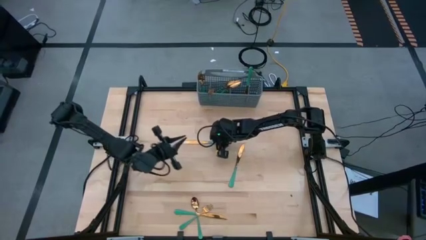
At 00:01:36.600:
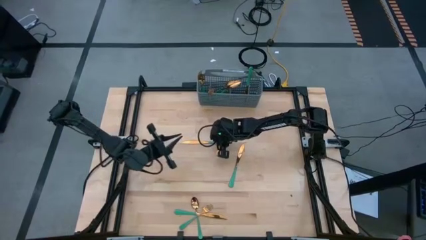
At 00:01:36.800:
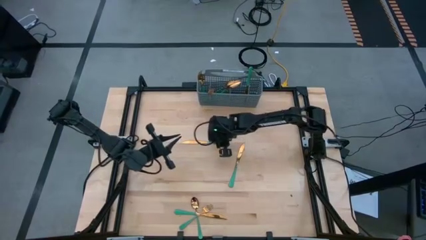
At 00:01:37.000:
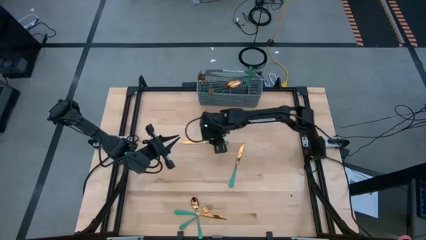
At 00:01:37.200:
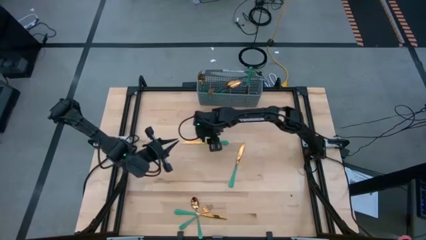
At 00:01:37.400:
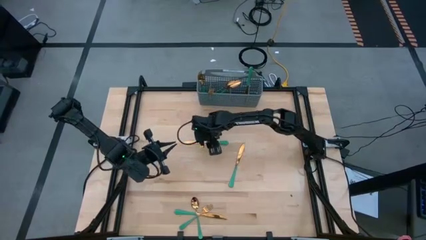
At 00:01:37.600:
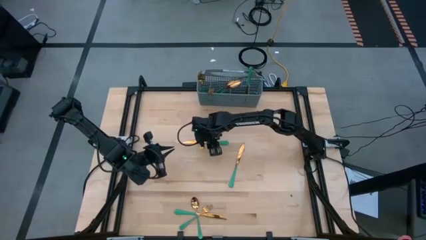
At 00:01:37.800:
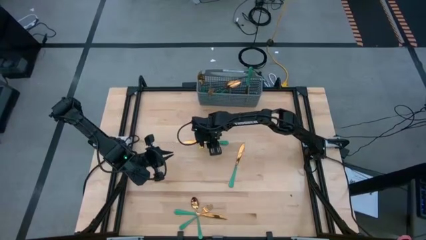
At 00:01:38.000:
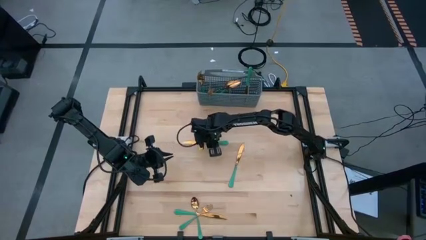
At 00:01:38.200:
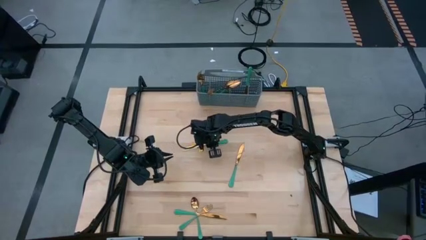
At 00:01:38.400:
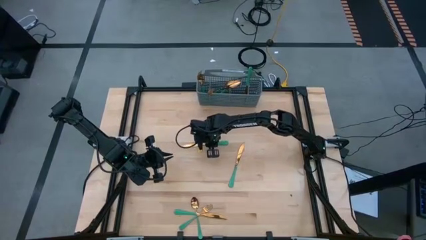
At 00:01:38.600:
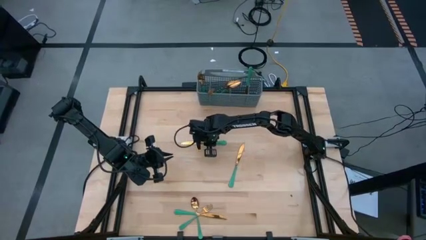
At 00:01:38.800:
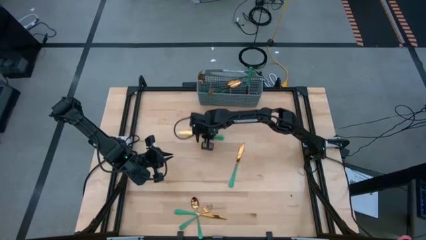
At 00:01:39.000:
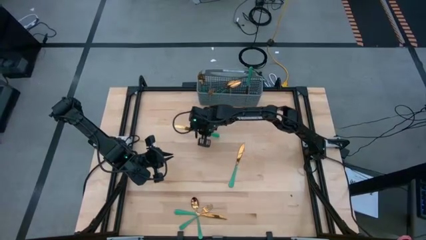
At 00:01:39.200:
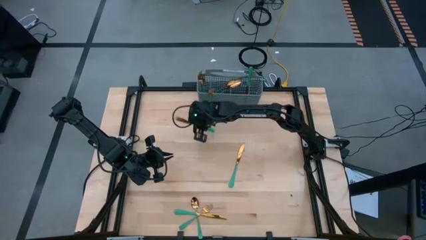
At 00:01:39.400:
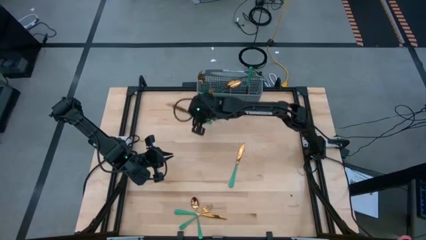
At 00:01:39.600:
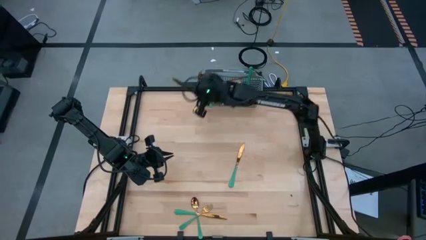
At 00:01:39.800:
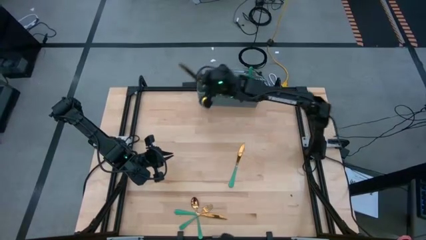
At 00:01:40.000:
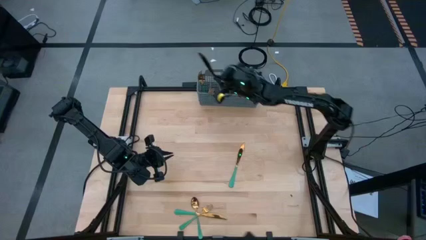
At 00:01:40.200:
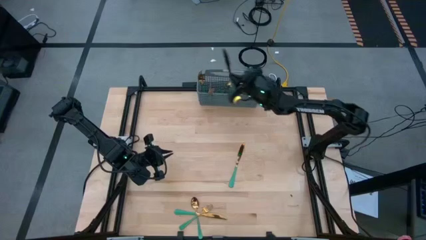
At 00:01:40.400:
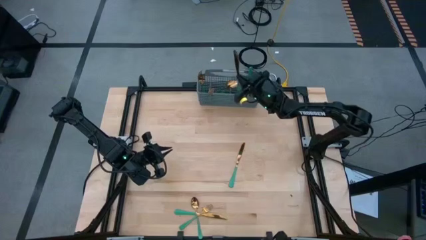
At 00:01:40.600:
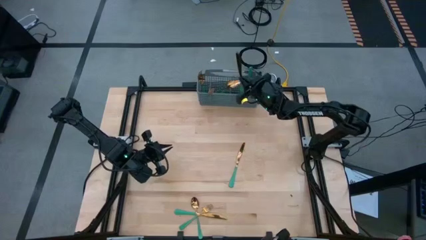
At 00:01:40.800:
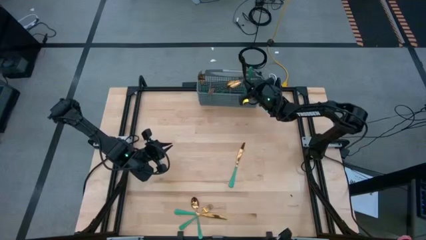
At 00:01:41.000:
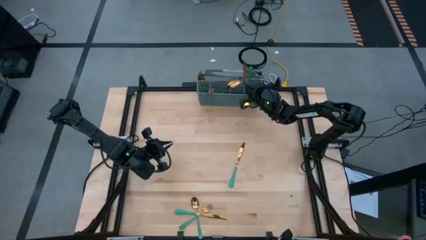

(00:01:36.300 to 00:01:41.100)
Task: Sort silverware
Put the green table knife into the gray silverware basket with the other table knife

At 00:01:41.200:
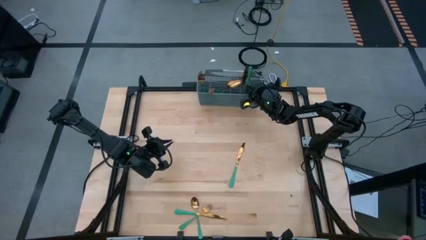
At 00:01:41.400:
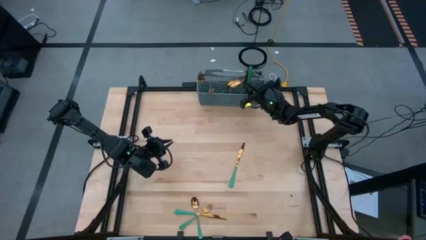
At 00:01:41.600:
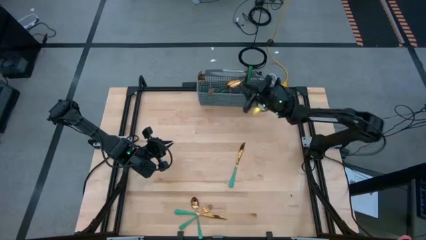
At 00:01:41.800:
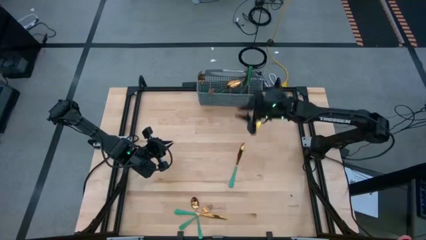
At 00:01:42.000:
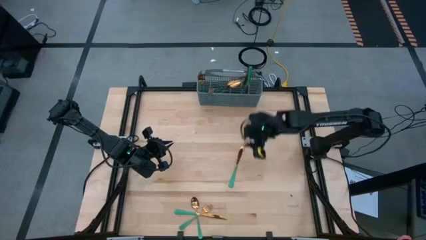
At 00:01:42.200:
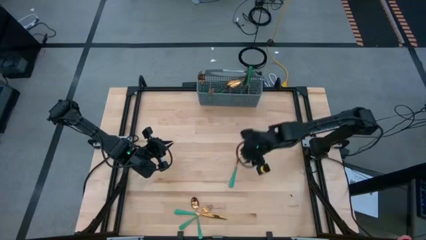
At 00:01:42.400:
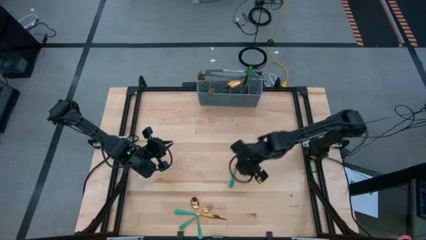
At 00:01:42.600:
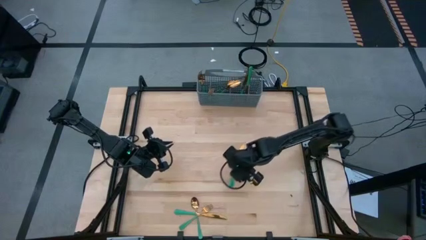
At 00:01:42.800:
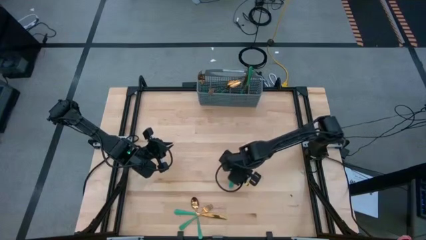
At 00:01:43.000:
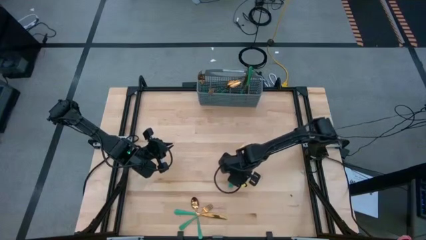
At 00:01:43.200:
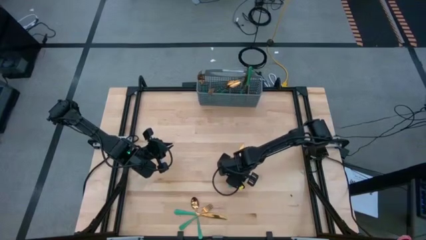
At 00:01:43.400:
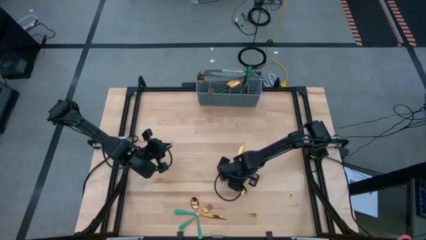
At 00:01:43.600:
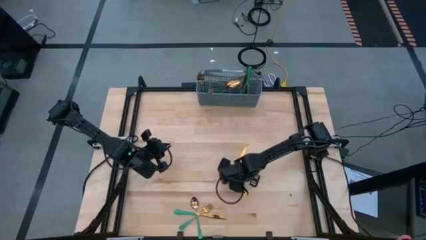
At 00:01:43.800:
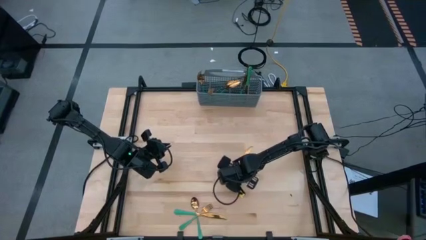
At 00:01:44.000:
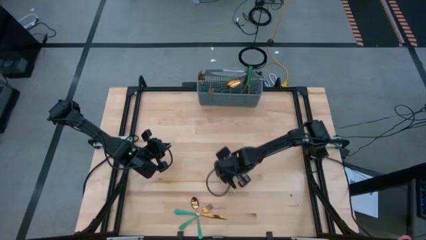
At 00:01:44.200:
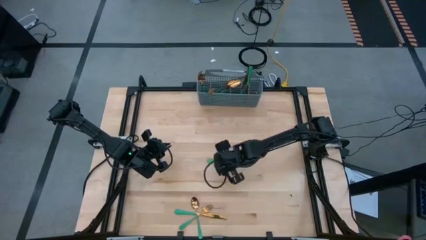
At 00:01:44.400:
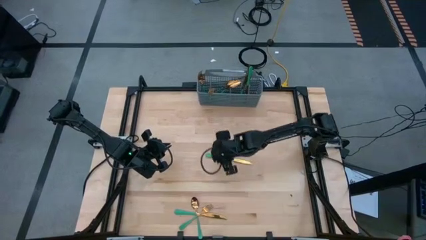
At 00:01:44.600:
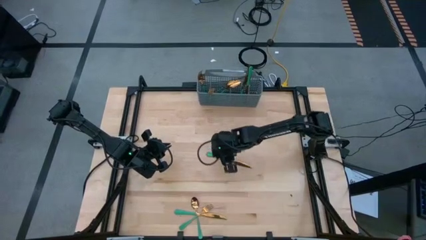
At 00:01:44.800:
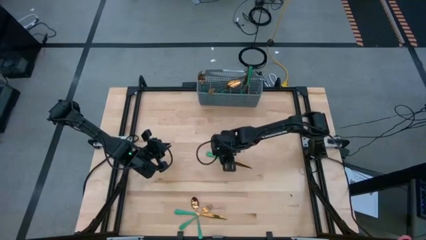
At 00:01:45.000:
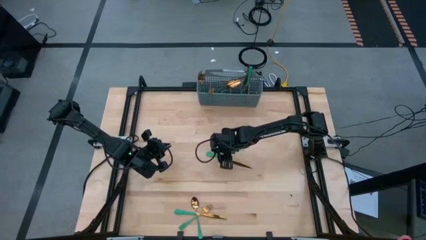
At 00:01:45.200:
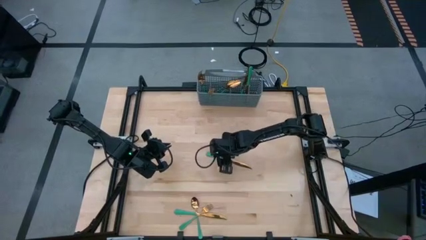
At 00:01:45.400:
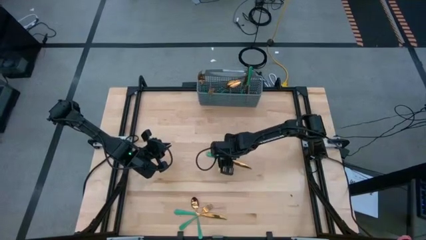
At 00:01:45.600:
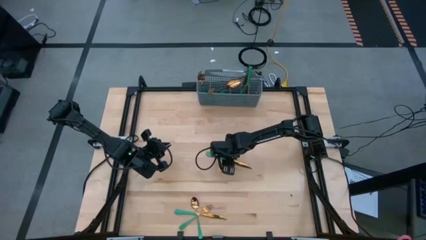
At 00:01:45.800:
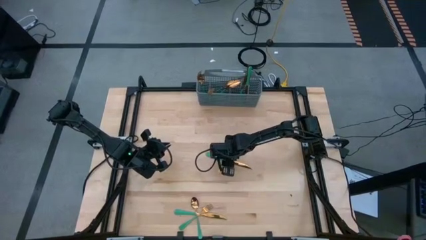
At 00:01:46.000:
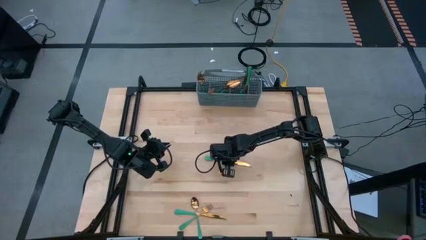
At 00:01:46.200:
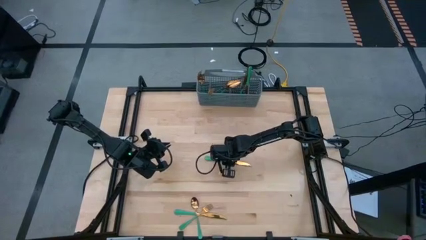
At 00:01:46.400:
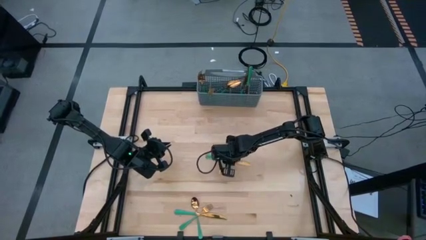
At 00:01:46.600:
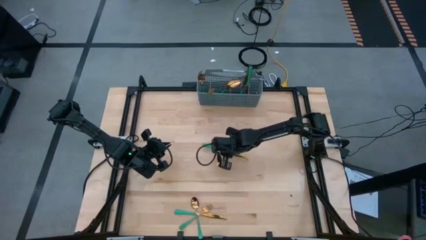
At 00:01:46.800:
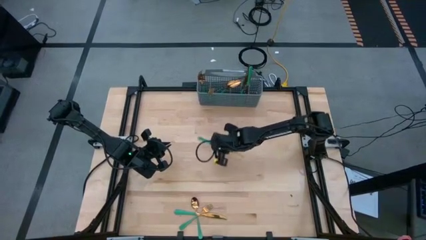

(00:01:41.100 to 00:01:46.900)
Put the green knife into the gray silverware basket with the other knives

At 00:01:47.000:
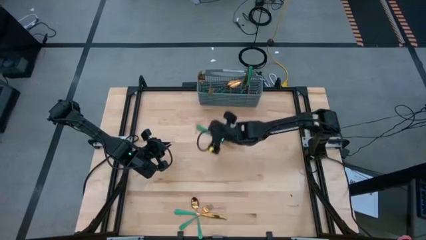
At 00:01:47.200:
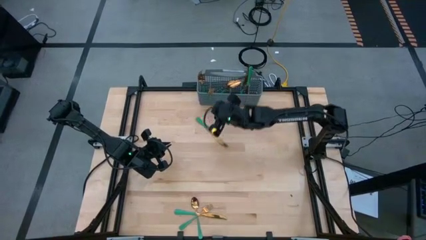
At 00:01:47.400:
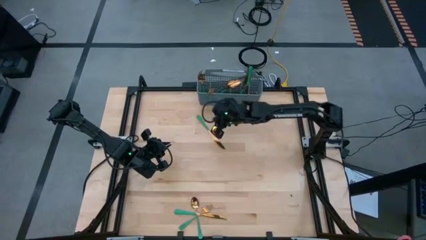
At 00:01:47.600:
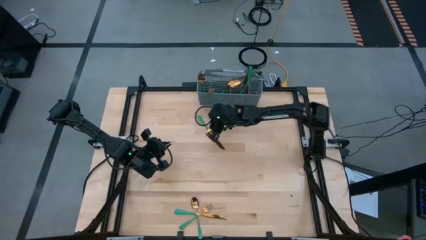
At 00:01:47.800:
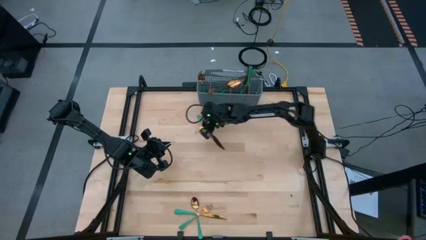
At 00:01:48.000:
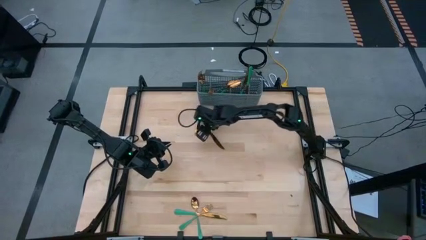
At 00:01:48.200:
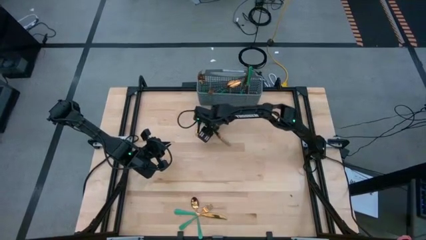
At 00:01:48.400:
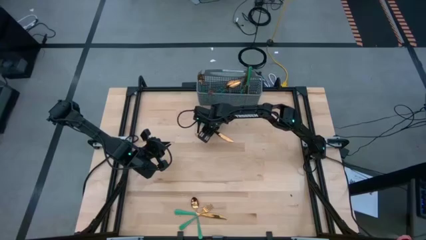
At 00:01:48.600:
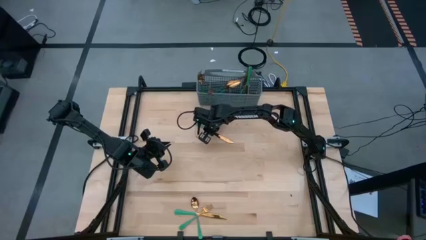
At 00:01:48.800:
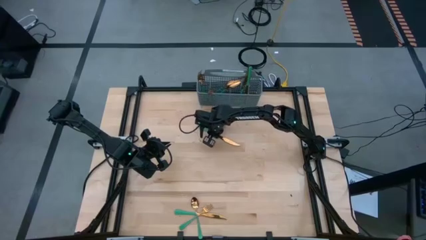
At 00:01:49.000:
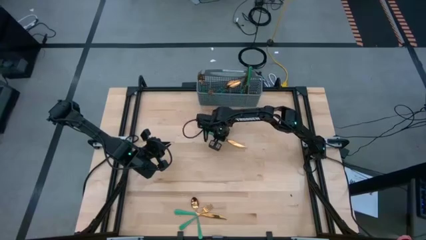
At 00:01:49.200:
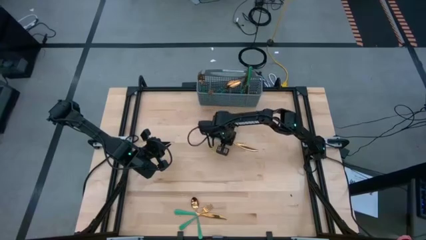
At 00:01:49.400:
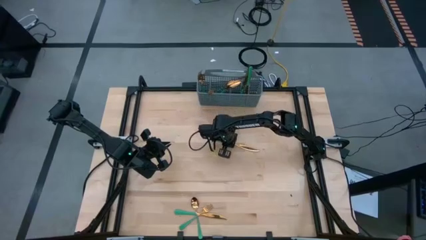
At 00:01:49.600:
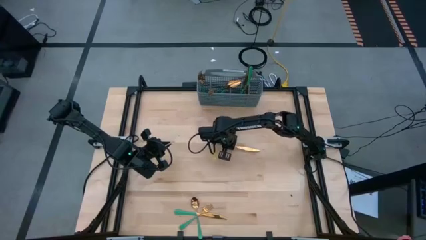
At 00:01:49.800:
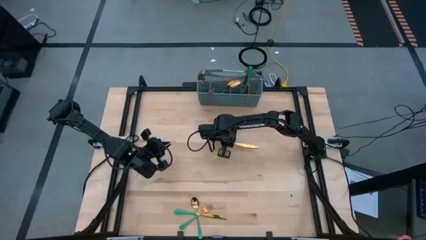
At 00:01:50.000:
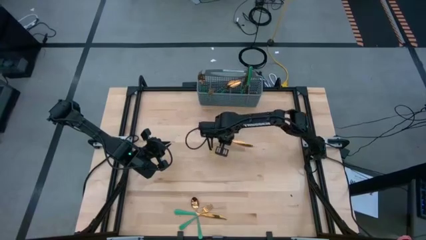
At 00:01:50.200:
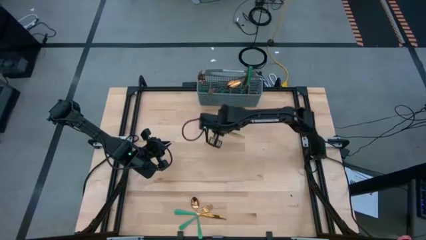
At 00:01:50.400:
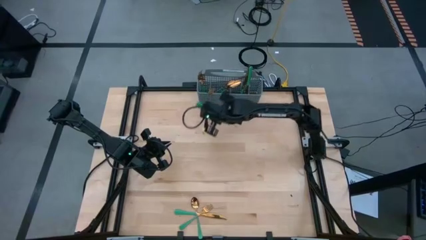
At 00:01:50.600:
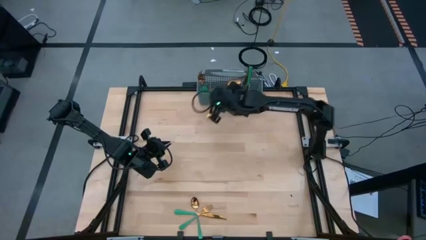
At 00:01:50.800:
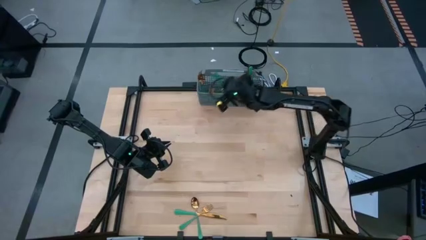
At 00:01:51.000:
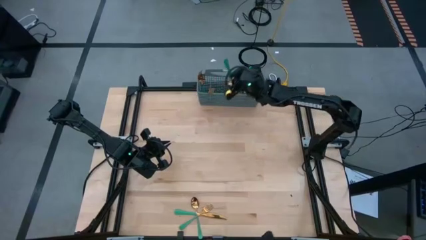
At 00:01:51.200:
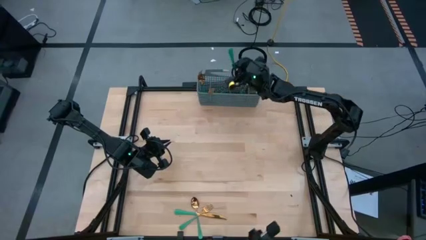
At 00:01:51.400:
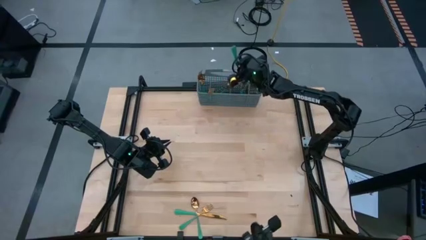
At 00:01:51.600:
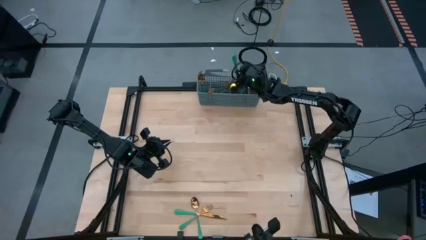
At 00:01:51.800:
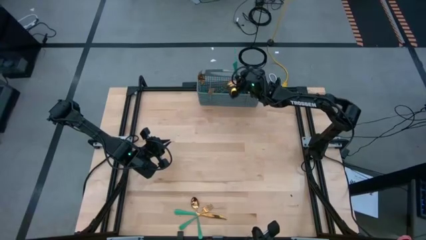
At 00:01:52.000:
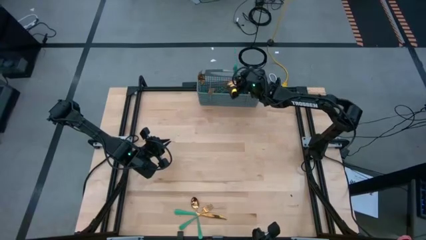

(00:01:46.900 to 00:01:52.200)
Put the green knife into the gray silverware basket with the other knives
